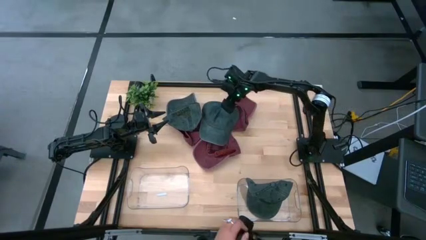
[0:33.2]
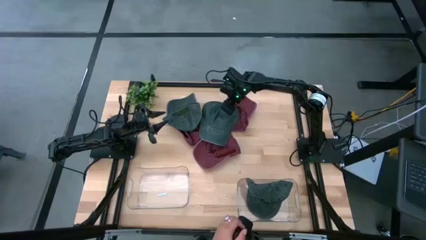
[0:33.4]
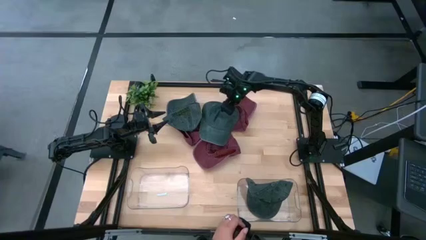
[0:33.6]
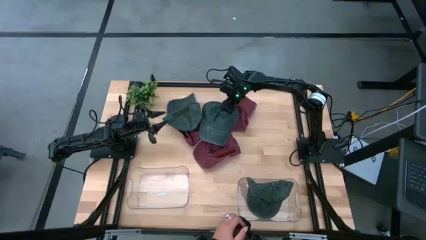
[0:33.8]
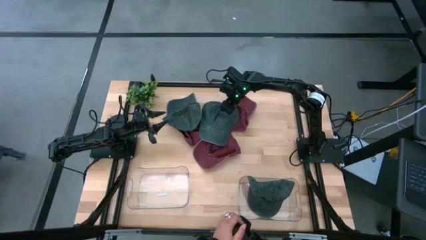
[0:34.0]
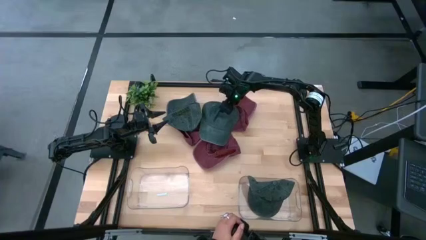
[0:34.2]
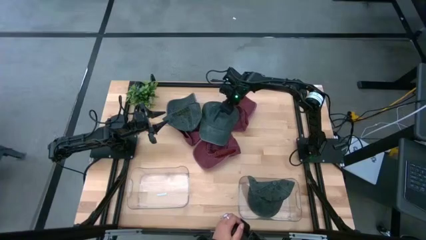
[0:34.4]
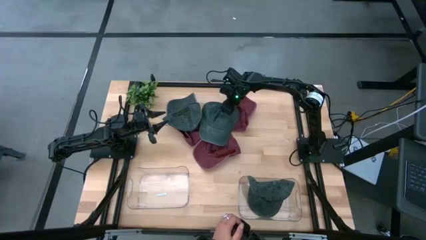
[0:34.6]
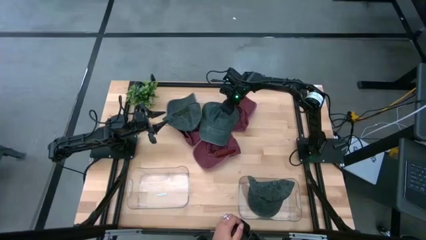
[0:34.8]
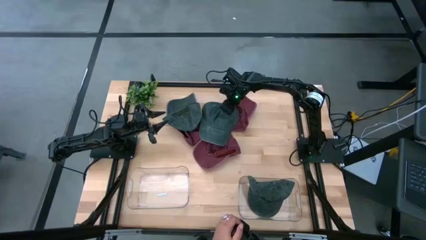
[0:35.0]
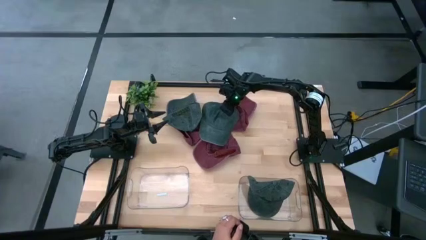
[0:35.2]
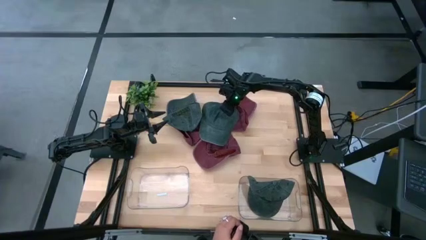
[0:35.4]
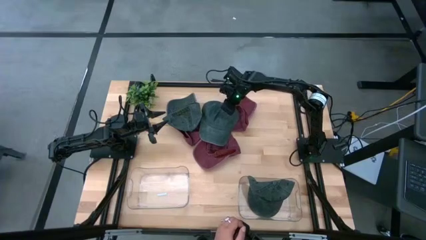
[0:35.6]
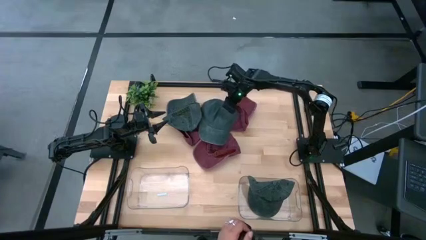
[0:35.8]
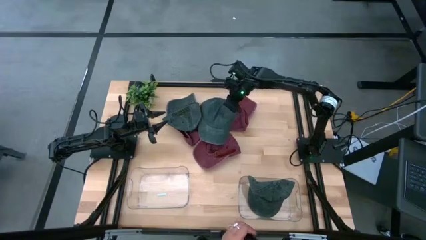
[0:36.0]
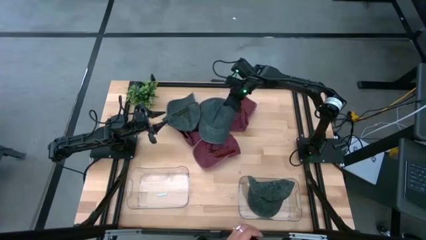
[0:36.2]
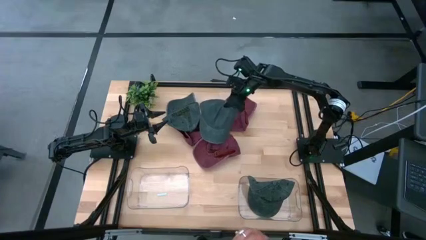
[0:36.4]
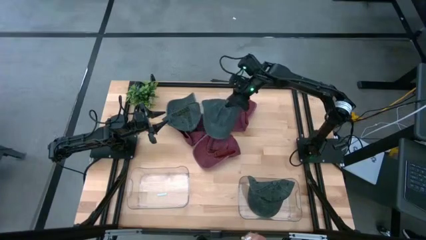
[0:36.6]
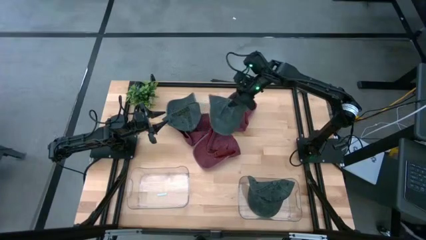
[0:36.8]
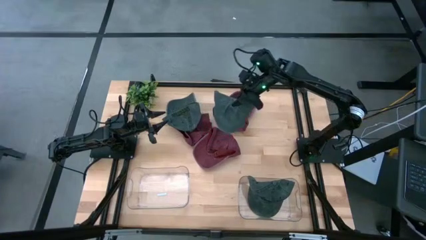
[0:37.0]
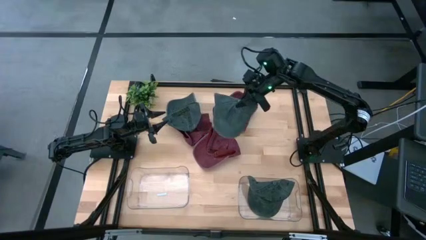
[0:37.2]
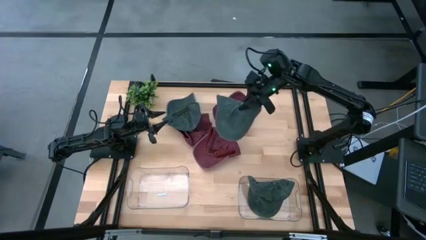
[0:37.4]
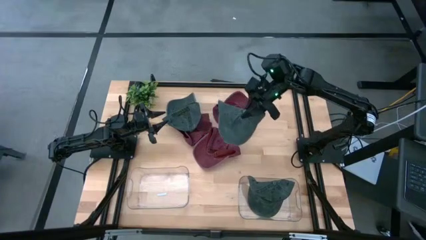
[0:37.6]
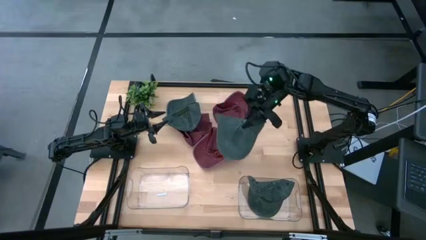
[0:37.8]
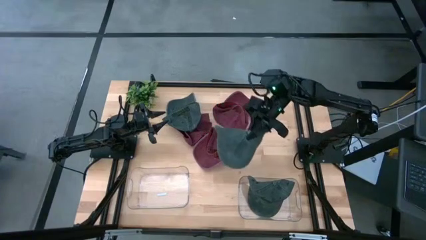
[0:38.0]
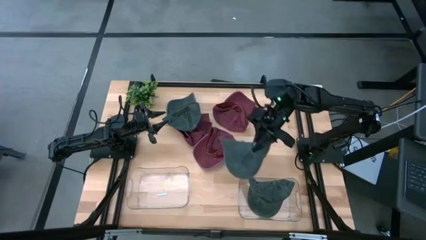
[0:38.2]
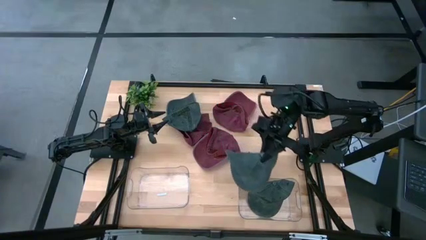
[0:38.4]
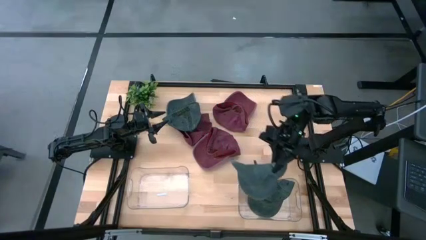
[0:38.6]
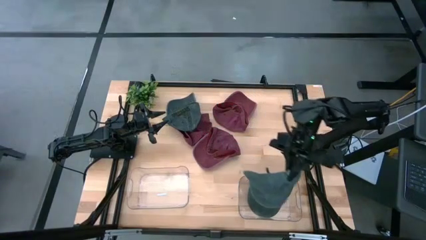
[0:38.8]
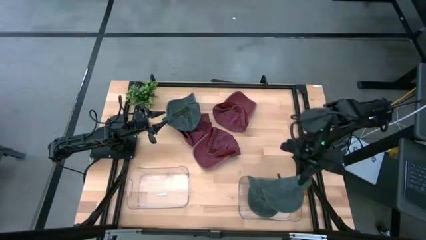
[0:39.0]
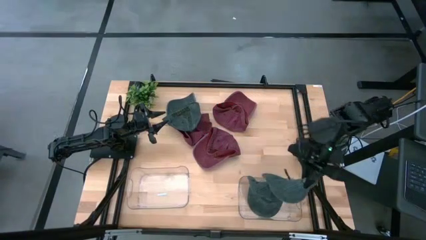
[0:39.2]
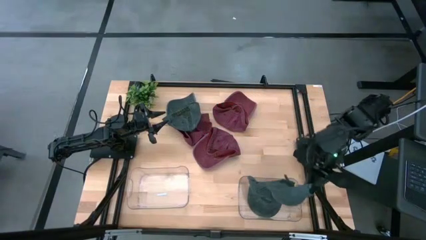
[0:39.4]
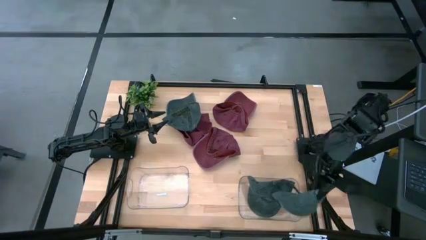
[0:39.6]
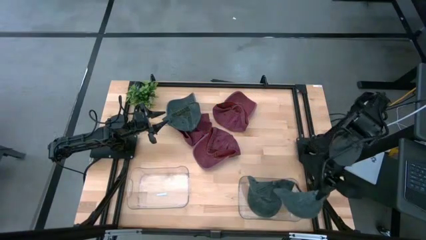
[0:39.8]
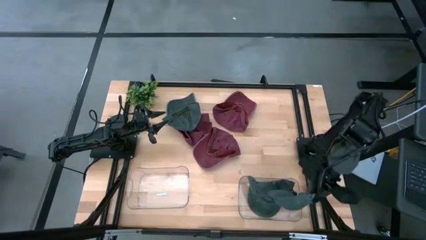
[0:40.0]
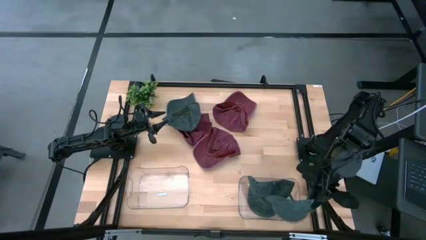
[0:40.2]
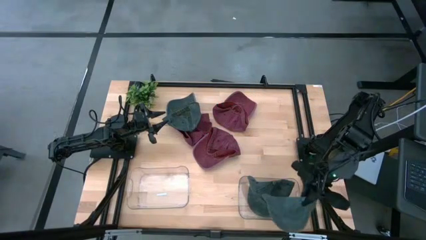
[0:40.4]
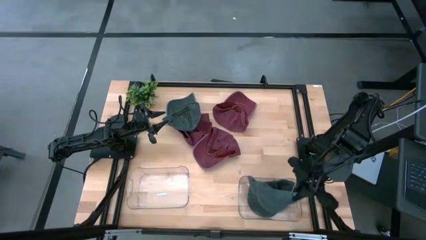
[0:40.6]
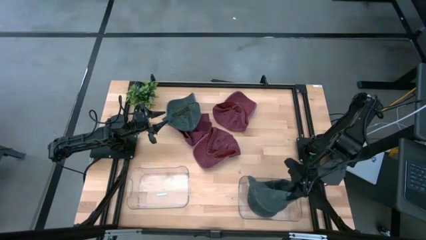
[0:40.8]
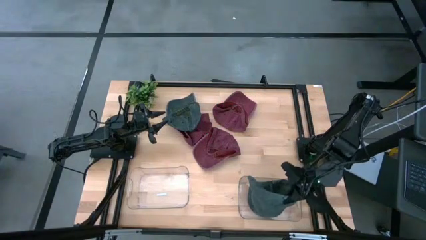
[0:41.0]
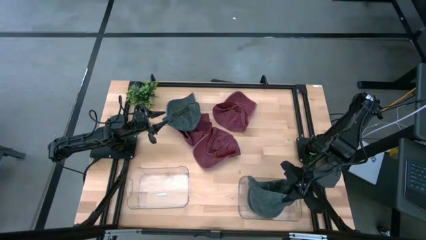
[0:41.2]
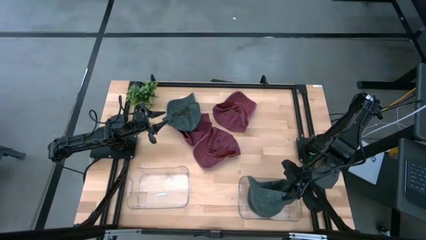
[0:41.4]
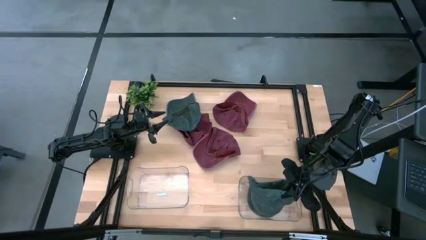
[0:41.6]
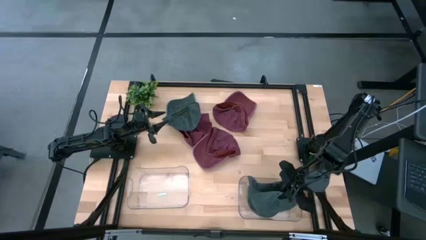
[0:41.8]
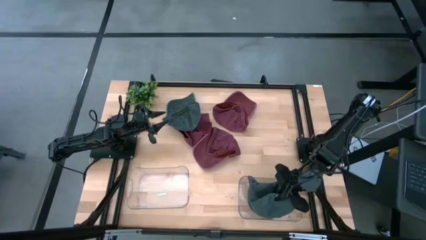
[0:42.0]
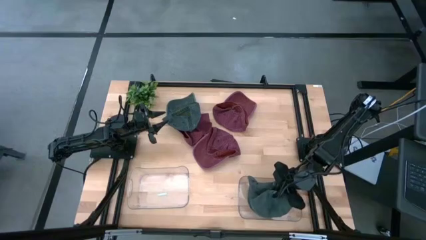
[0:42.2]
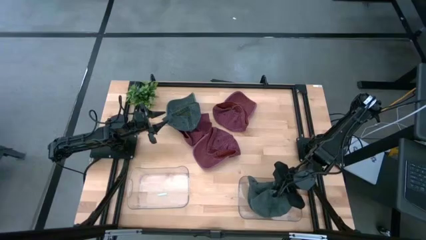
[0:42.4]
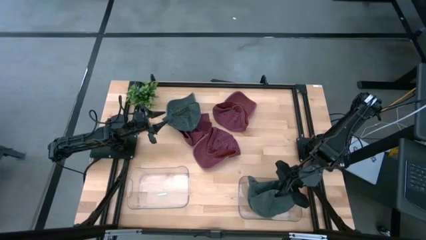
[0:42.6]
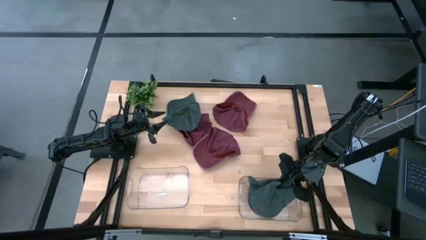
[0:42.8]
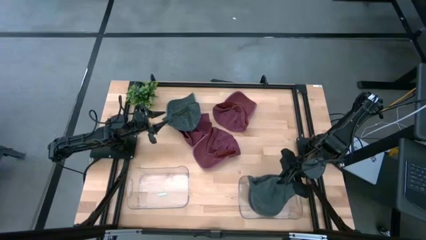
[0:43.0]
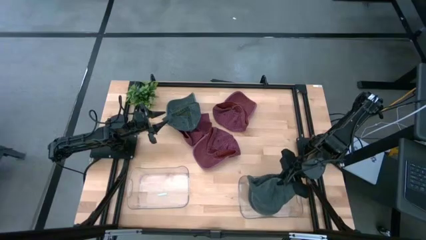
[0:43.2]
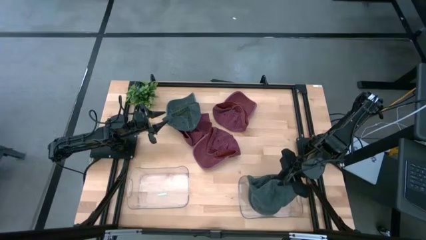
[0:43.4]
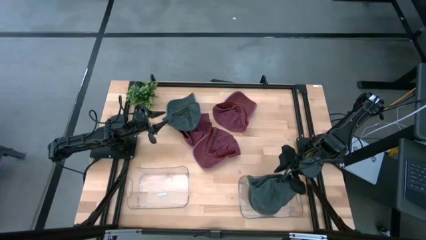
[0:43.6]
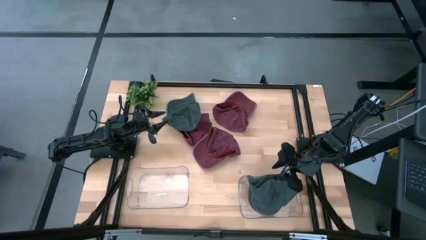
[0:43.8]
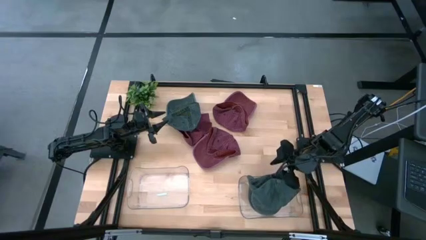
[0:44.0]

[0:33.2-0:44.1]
Task: Pick & Place hat
Put the right black cap into the right transparent bin

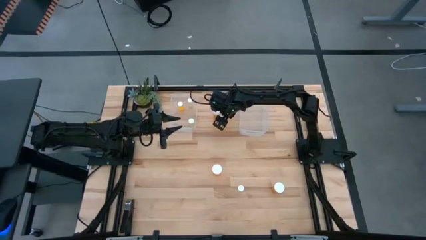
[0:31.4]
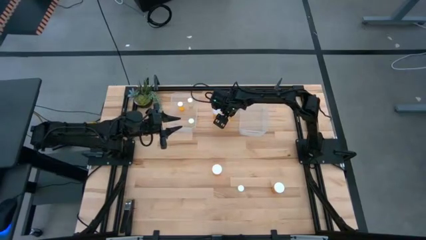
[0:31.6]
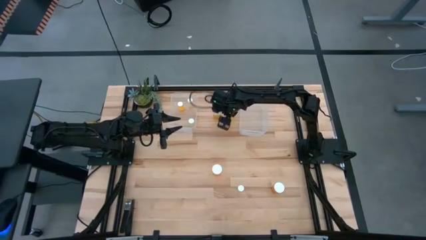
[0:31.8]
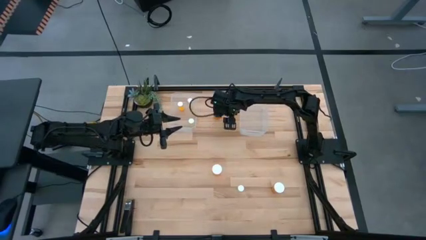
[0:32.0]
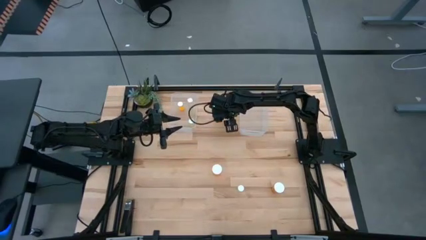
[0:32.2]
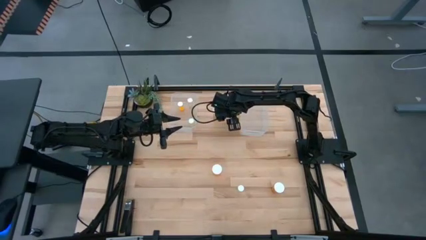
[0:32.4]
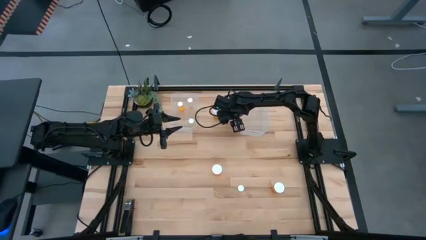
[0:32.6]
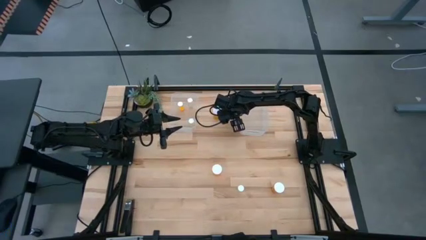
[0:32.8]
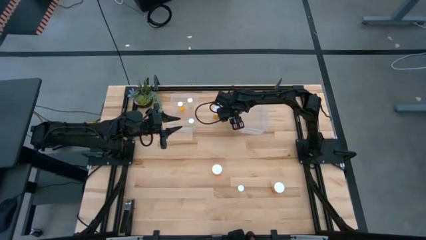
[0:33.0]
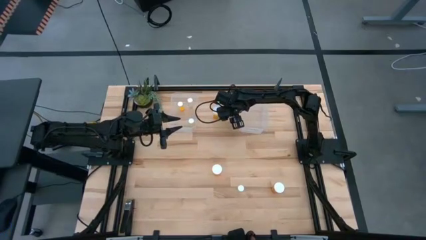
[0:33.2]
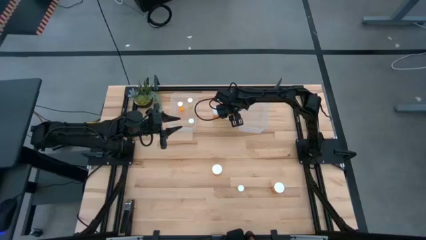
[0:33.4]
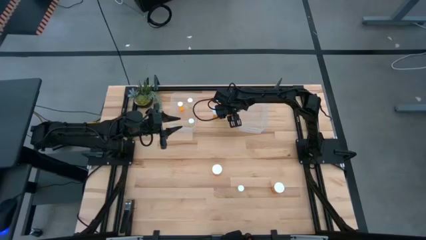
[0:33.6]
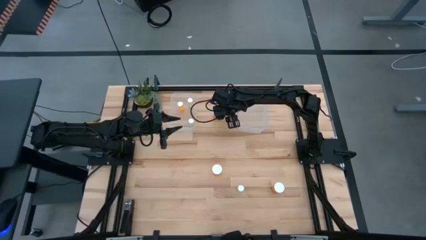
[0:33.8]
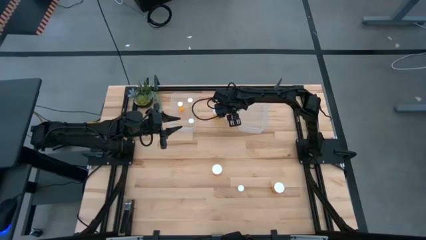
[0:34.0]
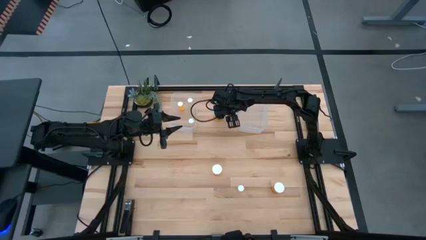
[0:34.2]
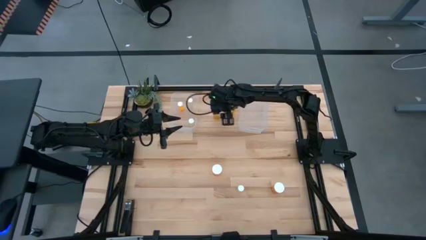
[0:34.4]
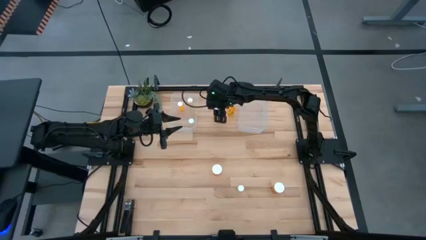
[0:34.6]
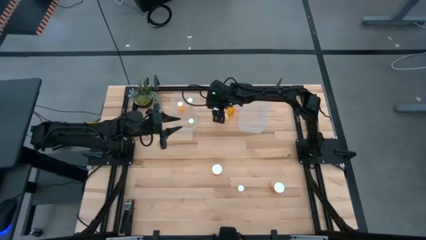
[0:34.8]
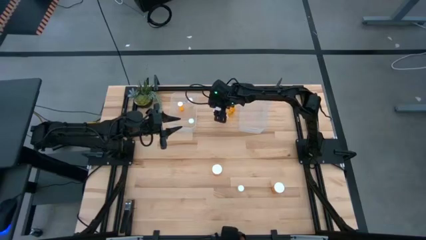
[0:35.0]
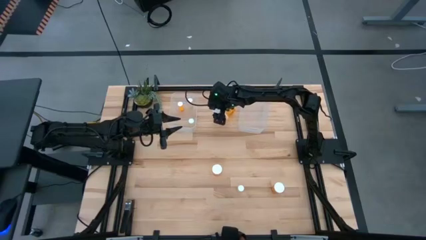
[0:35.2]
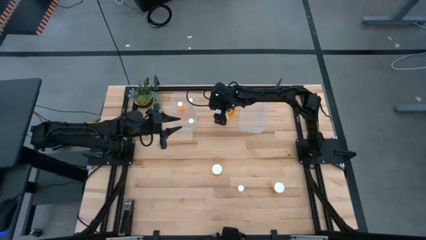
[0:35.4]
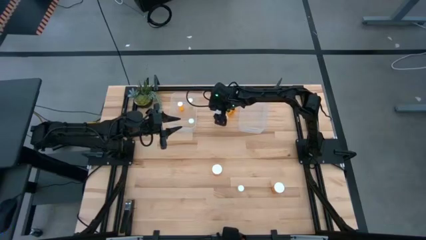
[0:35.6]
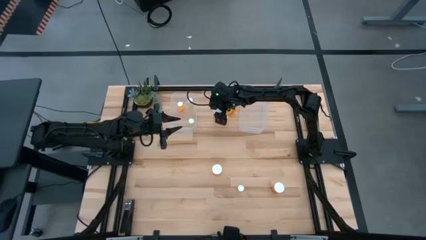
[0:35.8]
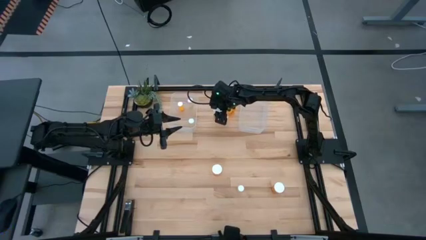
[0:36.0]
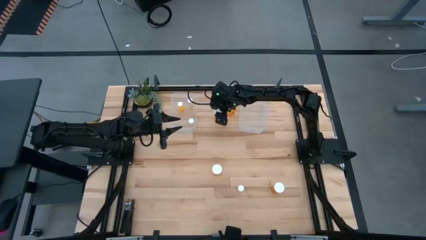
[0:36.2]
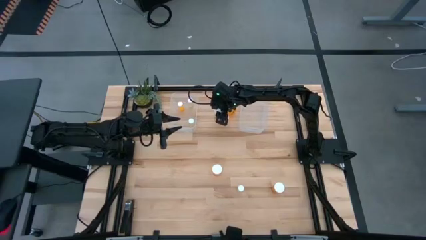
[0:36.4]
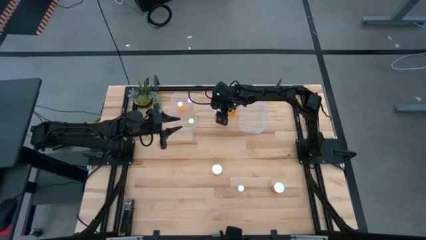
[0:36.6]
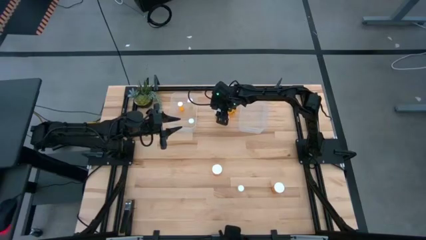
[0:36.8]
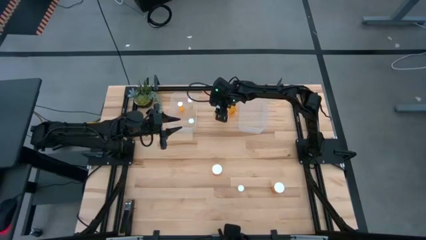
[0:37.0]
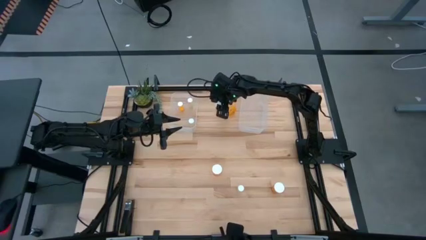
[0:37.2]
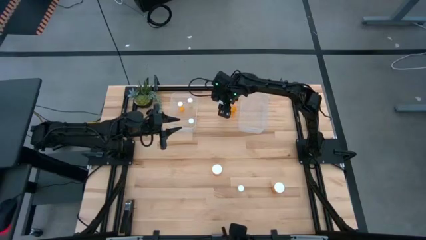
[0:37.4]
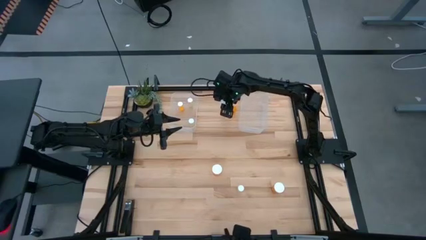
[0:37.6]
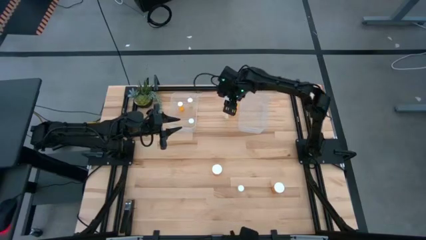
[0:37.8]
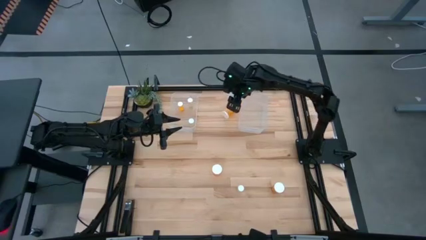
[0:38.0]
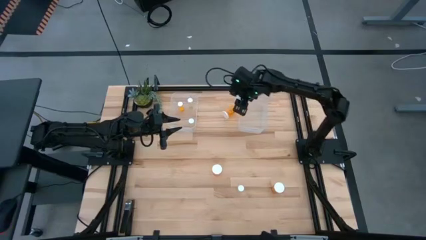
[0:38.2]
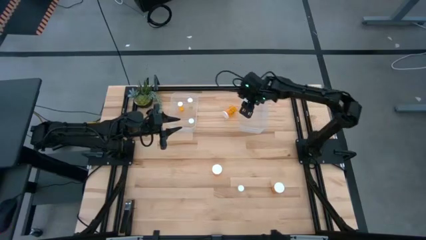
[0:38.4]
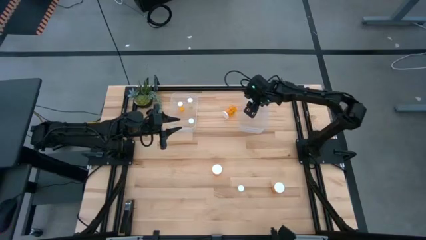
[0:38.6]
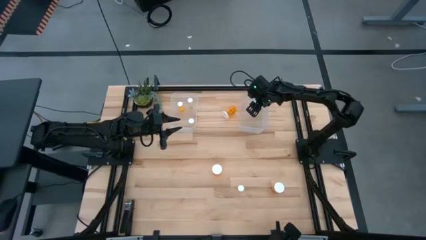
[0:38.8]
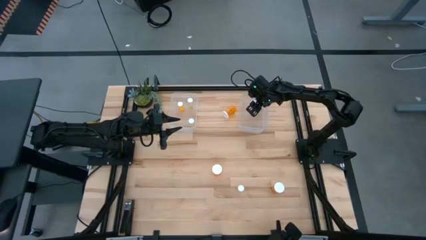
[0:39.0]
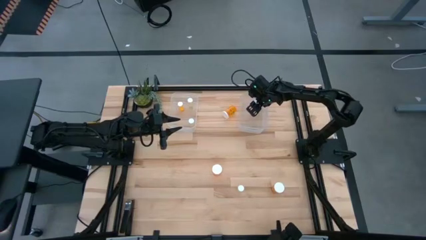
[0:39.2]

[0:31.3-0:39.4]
Task: Pick and place medicine bottles into bin by pill shape (circle, oval)
Put the large orange pill bottle into the right transparent bin
